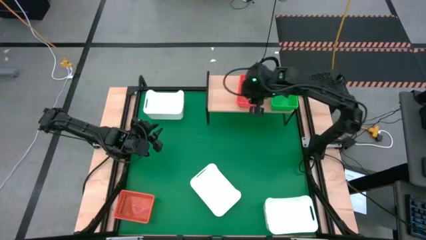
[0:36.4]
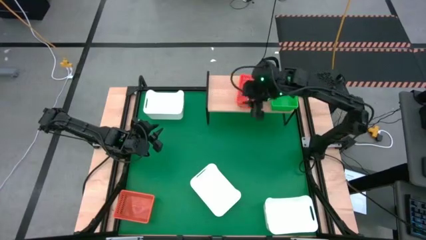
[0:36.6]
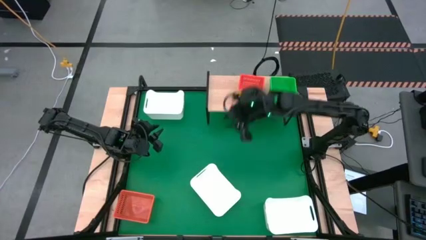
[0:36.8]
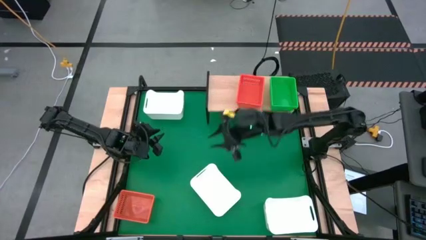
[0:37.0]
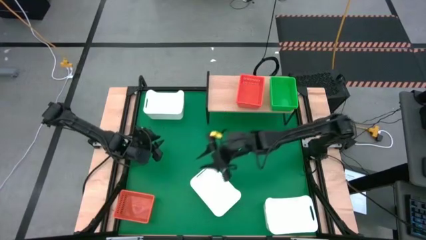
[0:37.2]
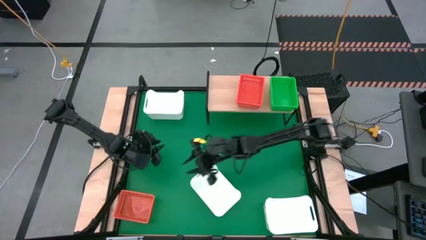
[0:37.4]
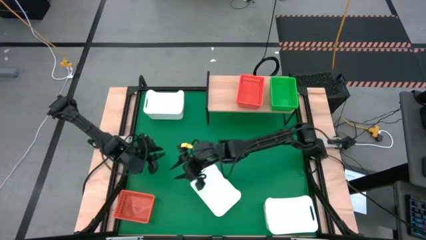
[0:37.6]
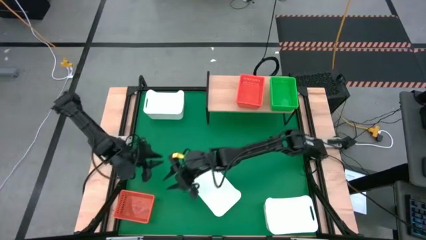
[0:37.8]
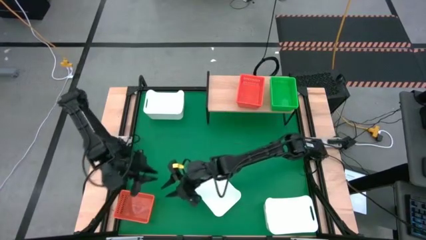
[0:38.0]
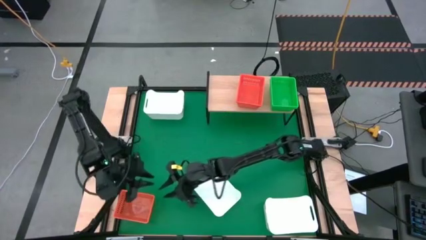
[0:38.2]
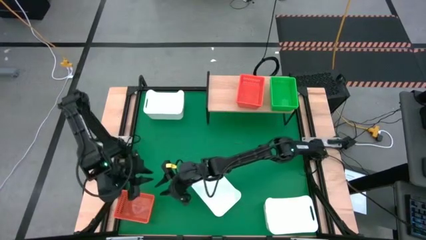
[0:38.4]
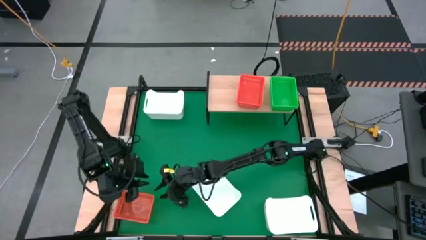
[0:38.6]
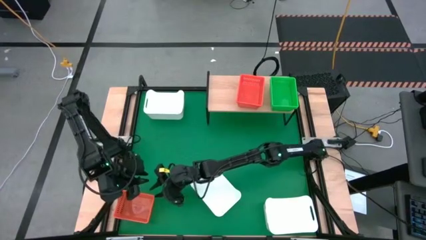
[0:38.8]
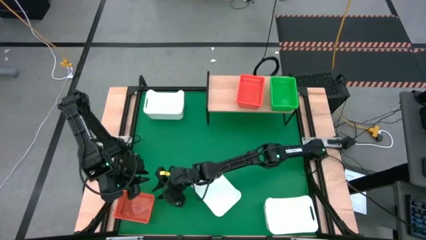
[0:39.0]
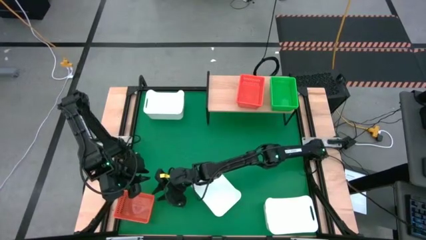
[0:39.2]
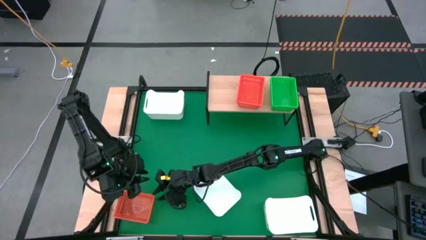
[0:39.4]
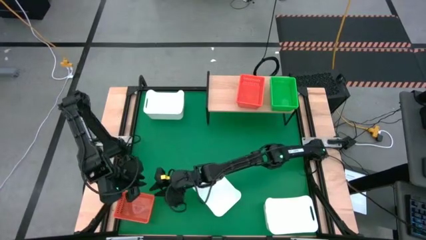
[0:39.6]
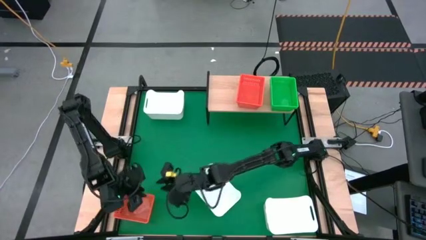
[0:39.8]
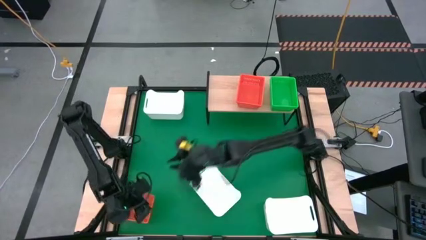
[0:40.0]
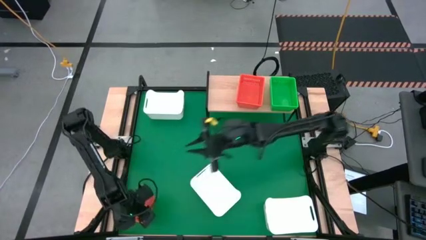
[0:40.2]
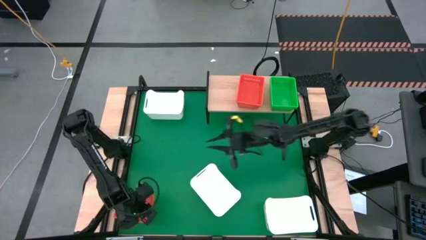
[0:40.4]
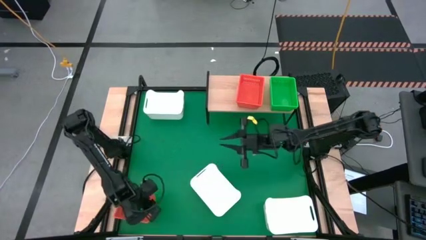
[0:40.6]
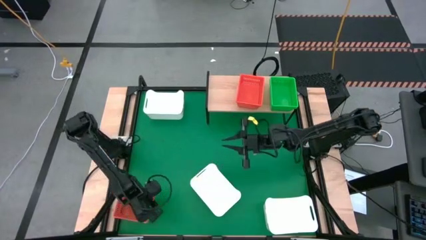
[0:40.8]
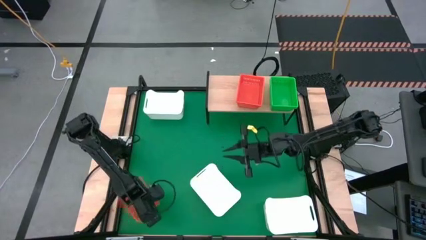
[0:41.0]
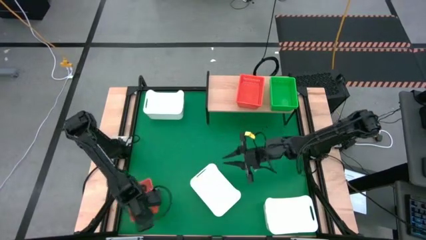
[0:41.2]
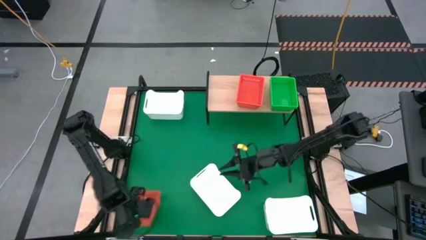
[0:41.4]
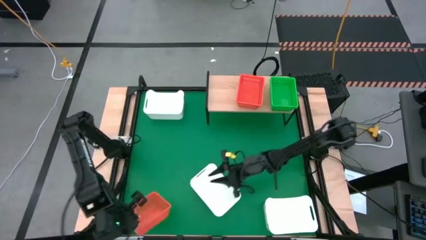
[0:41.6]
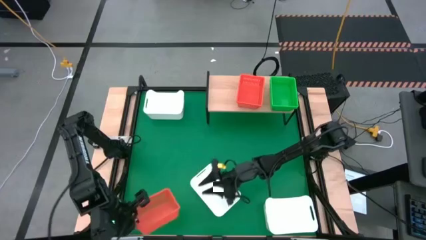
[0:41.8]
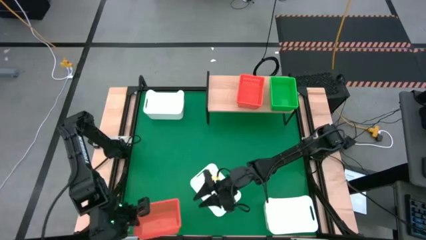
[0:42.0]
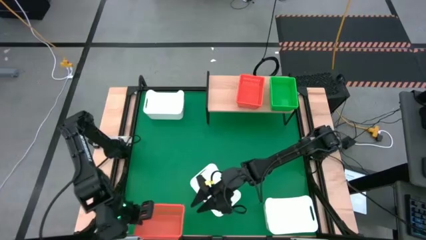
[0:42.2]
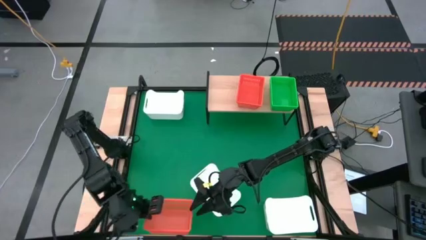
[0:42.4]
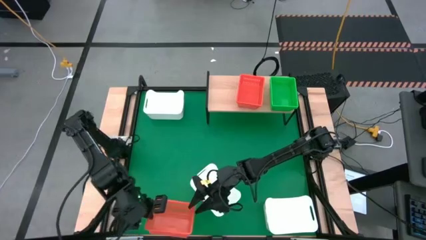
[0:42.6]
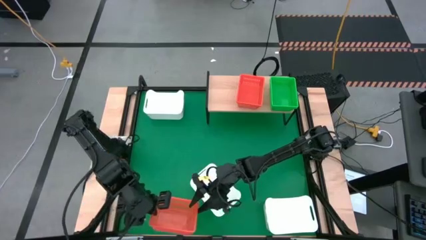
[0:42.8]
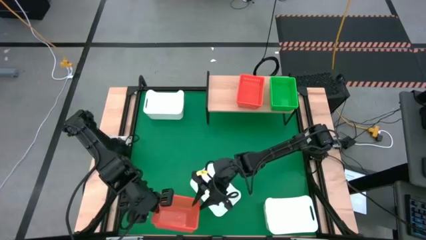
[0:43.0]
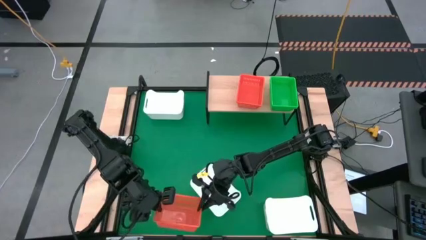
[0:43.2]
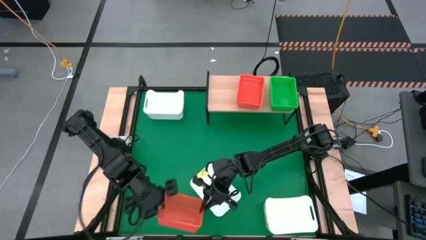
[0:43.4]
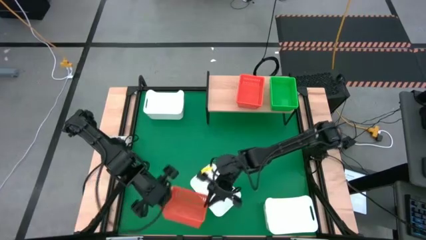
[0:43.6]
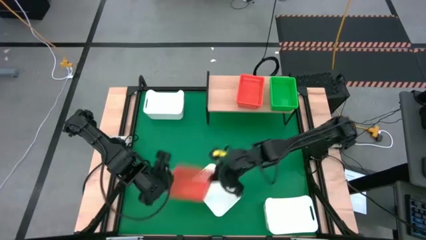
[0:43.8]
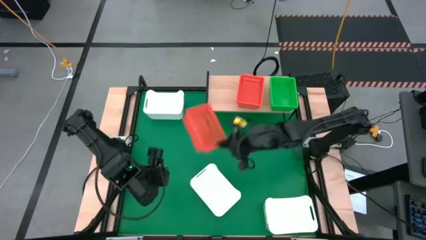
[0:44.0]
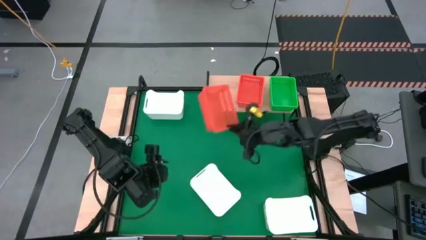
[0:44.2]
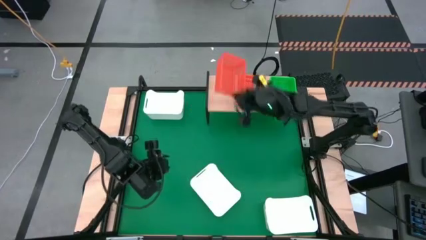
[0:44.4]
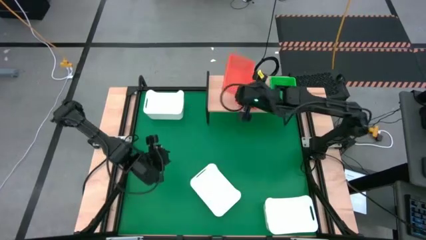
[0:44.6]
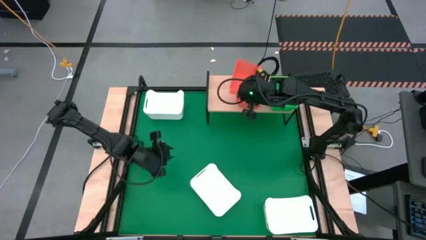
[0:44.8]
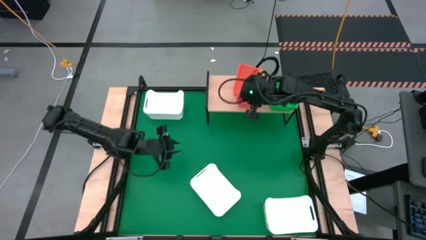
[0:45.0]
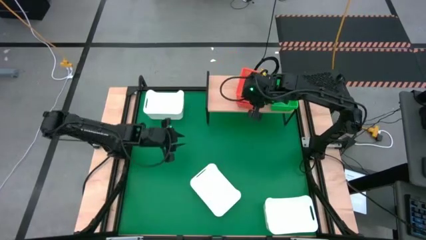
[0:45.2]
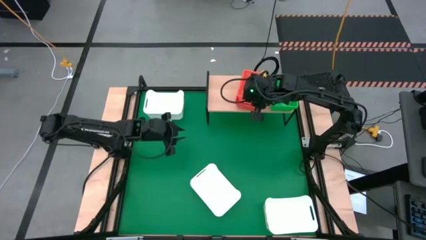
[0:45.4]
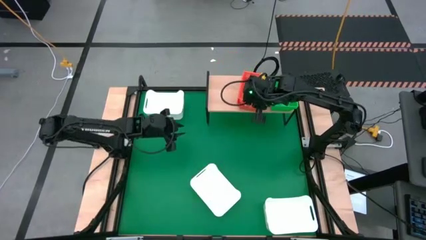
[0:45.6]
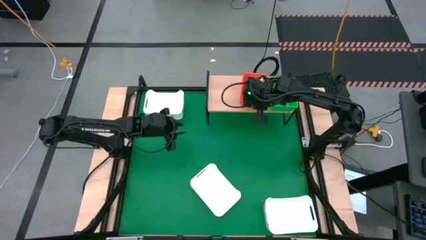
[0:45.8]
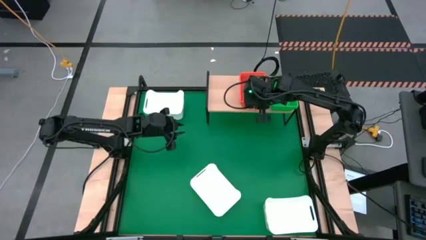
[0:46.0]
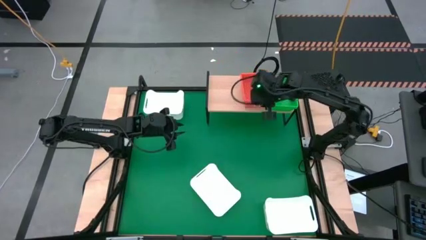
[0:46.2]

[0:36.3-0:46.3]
Task: Stack baskets on shelf by color
Stack the orange bin on top of the orange bin on the shelf

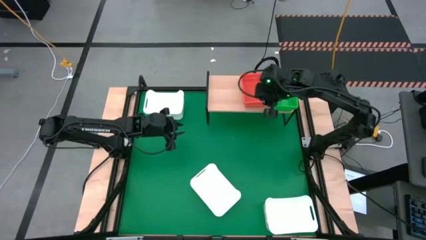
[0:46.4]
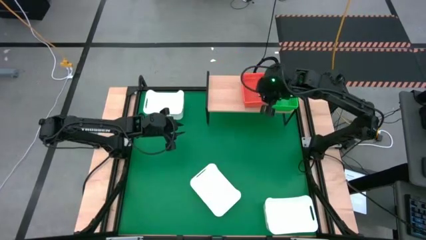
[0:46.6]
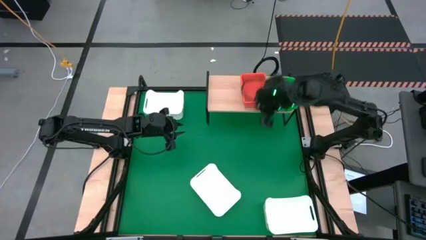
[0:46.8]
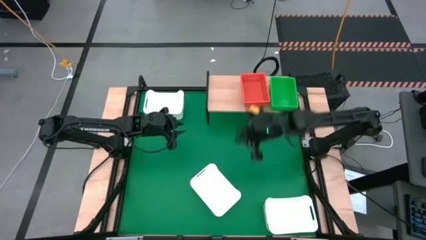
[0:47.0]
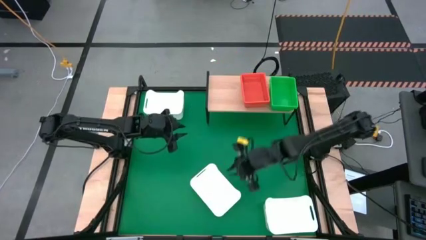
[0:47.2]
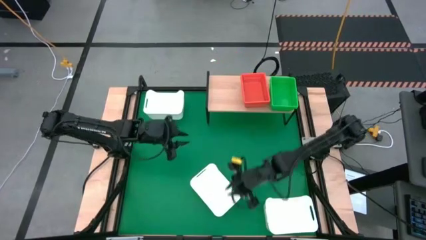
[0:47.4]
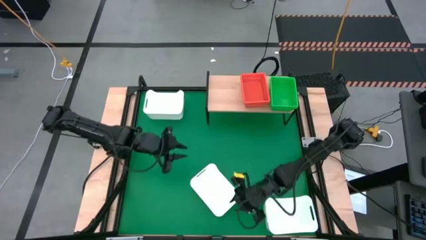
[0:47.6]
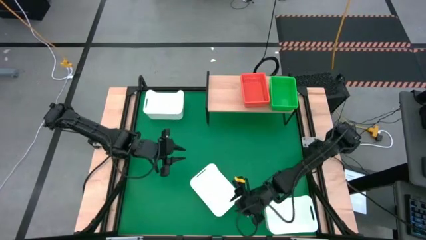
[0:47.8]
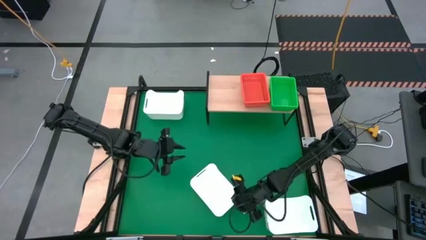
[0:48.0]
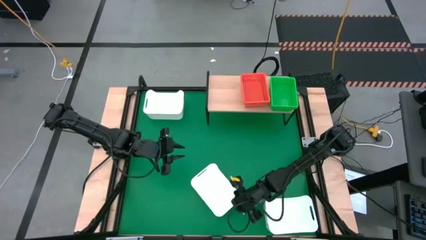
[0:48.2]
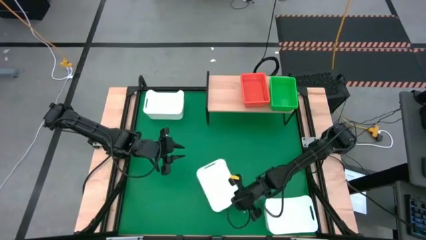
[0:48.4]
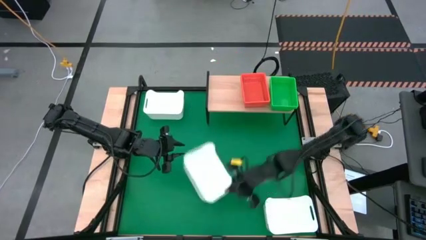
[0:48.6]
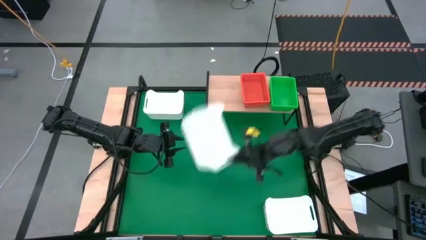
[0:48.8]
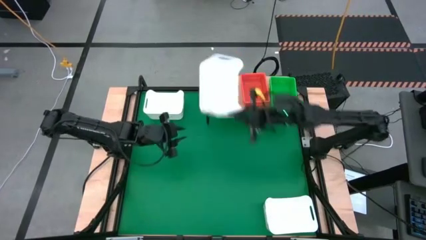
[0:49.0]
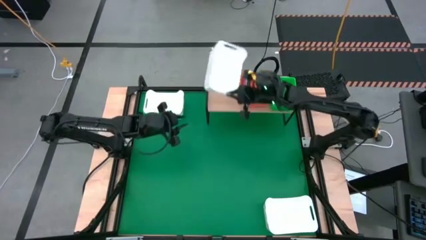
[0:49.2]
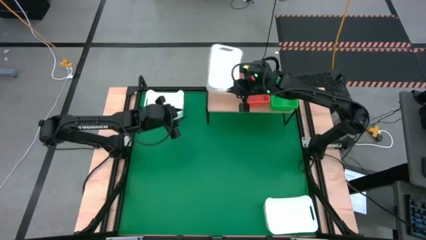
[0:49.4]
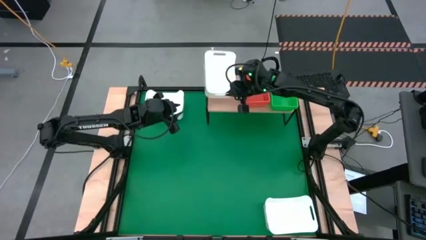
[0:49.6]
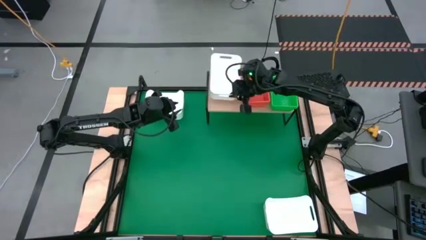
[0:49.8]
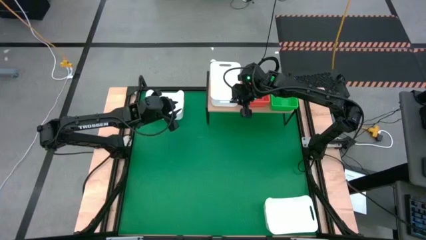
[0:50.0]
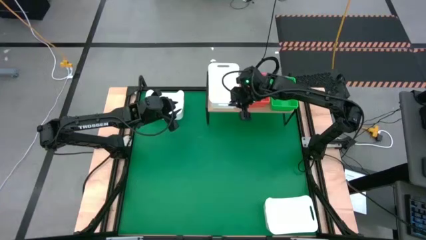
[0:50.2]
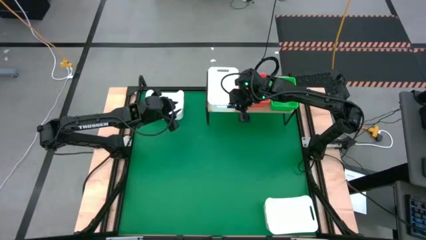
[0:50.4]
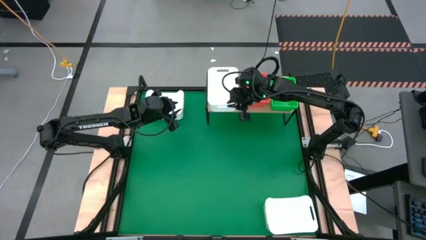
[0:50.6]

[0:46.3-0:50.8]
Put the bottom left white bin on the shelf

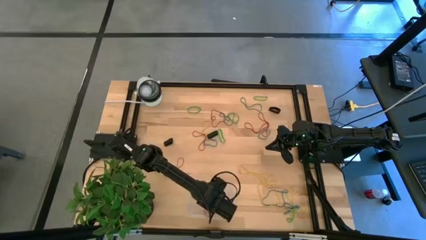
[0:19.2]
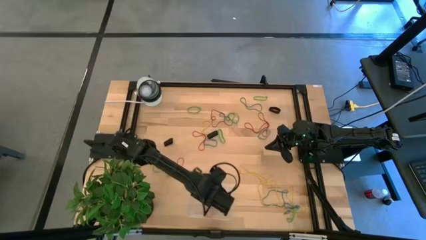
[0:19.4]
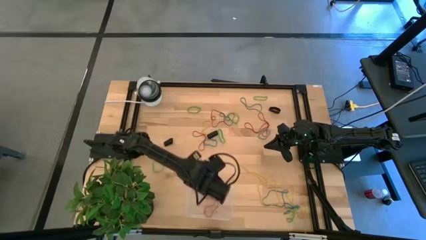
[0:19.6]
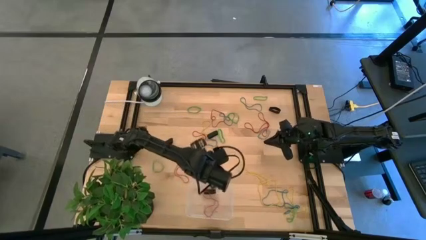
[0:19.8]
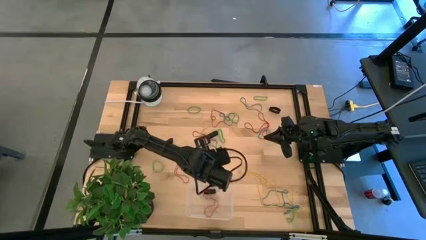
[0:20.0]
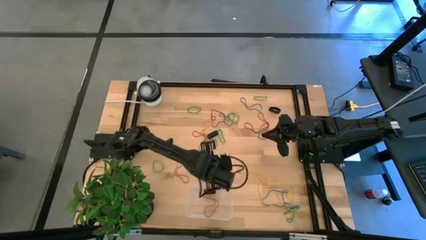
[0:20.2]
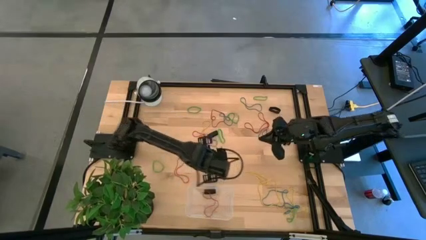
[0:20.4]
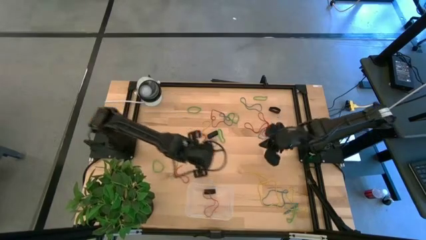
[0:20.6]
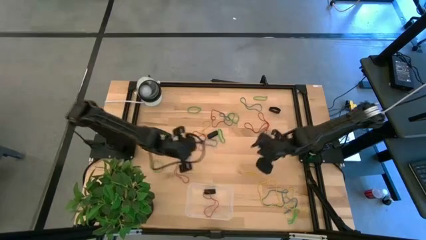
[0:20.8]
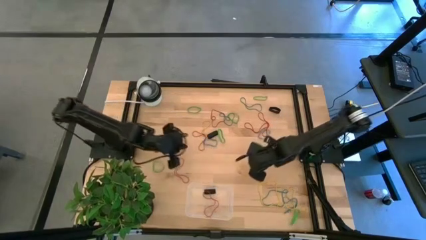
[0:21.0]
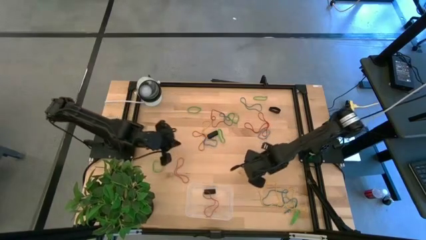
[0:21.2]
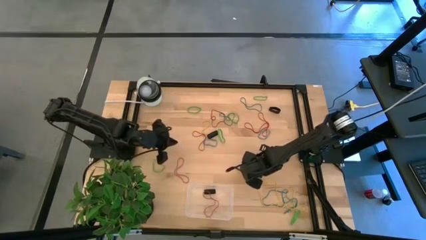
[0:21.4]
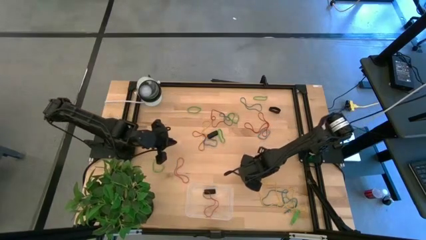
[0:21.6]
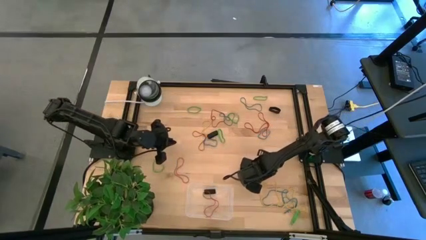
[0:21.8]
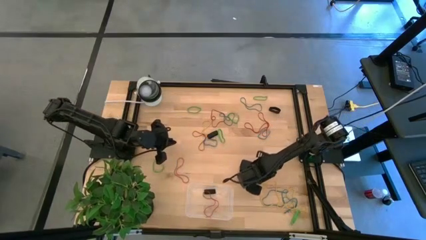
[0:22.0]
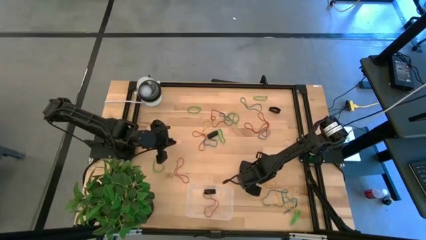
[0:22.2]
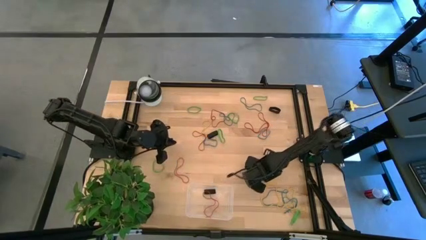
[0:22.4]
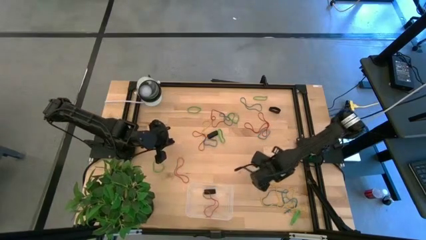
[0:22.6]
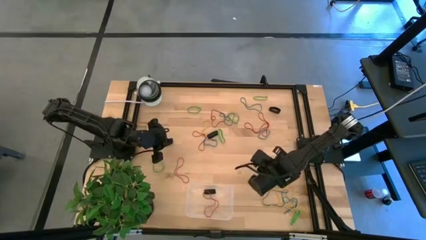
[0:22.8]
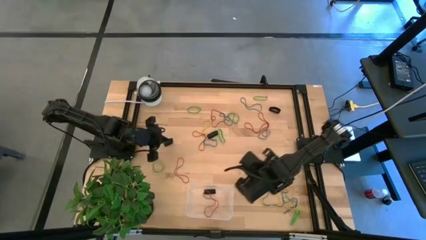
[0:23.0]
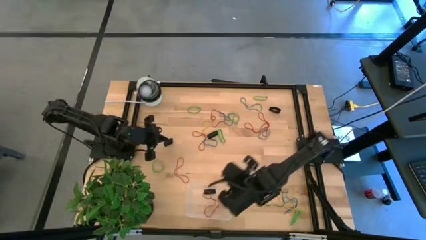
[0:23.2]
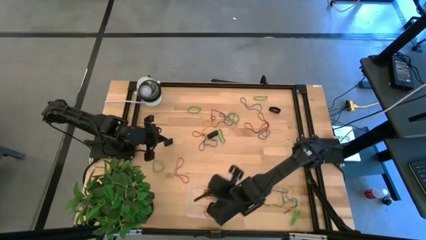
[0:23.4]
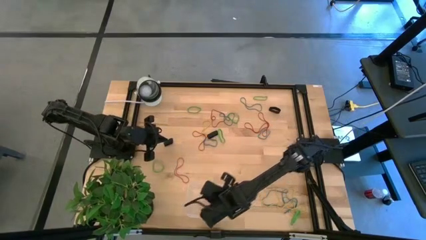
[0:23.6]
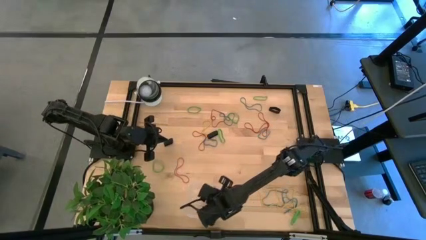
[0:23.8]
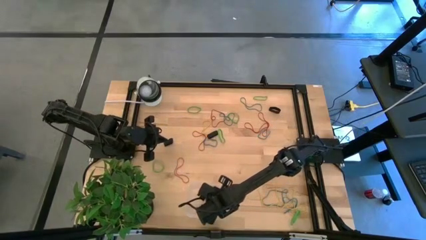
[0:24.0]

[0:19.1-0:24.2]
Task: Pick and place rubber bands into bin
Put the yellow rubber band into the transparent bin
